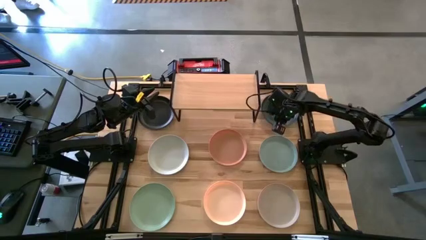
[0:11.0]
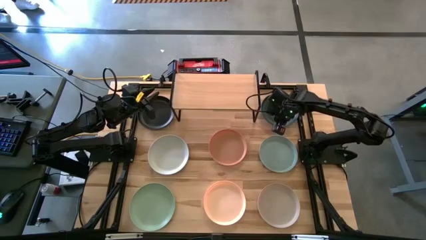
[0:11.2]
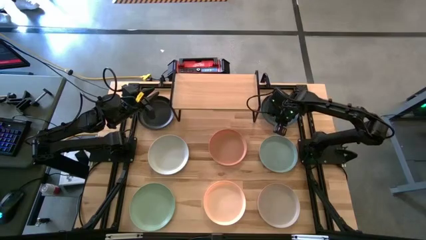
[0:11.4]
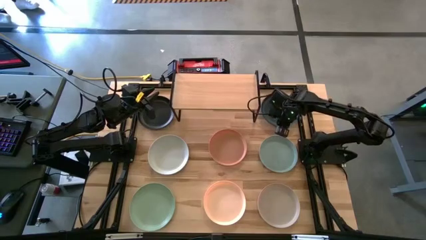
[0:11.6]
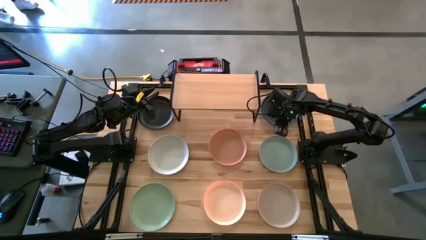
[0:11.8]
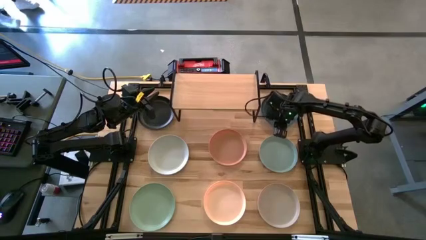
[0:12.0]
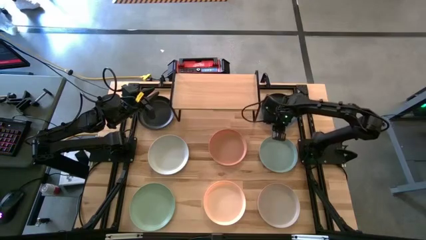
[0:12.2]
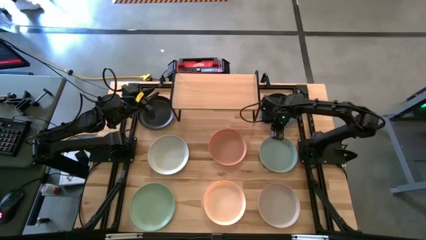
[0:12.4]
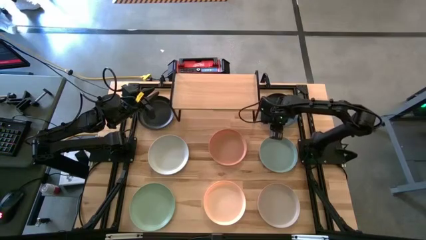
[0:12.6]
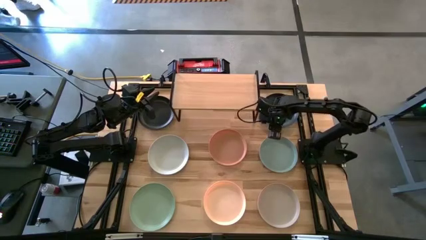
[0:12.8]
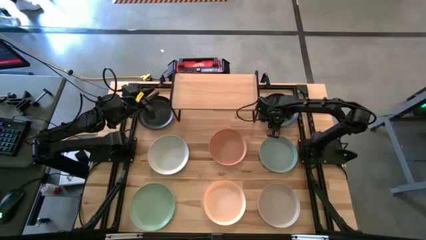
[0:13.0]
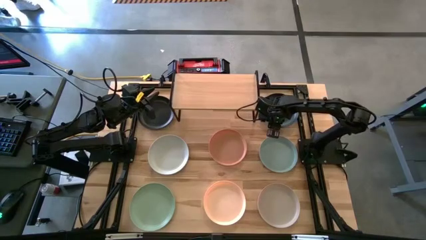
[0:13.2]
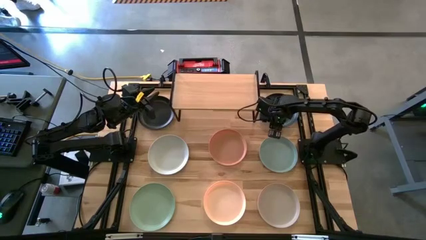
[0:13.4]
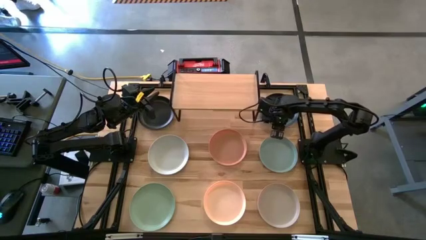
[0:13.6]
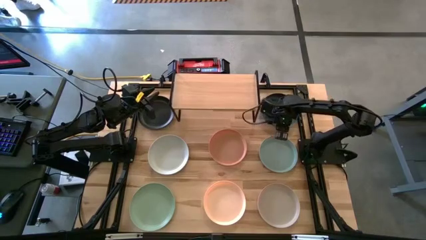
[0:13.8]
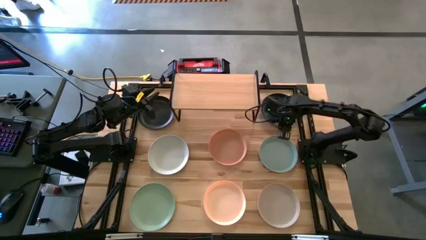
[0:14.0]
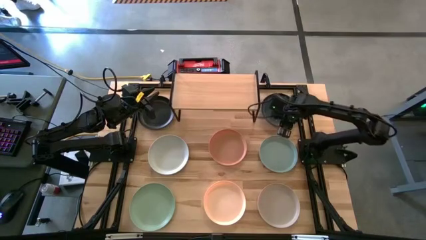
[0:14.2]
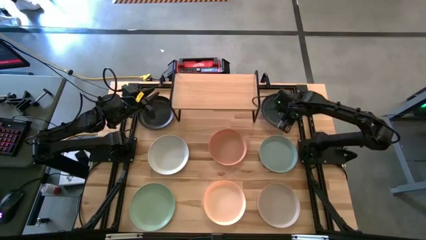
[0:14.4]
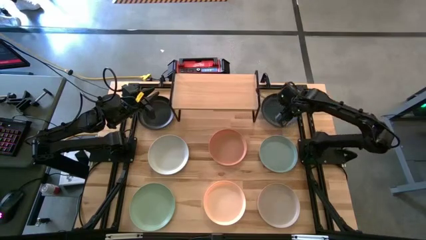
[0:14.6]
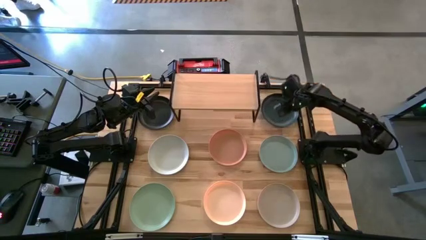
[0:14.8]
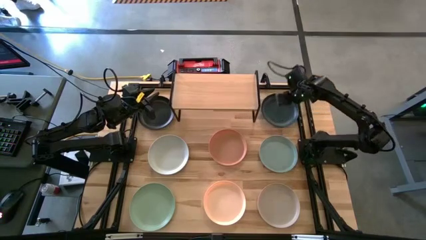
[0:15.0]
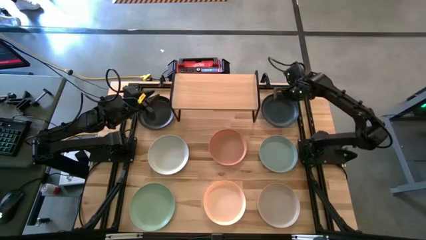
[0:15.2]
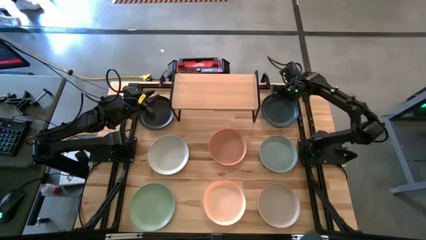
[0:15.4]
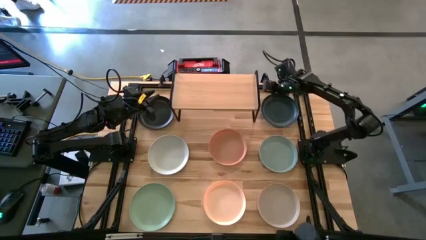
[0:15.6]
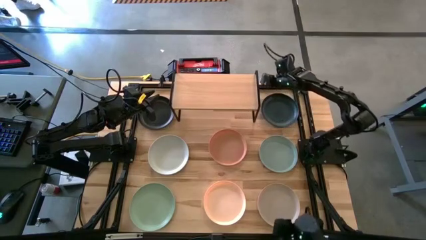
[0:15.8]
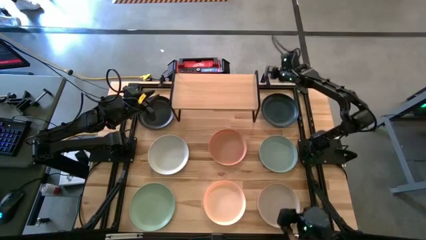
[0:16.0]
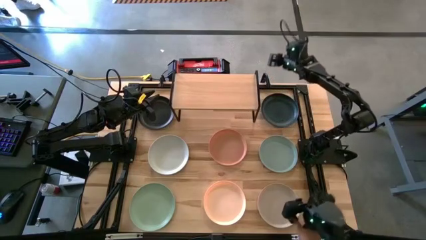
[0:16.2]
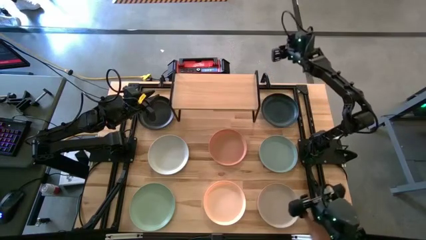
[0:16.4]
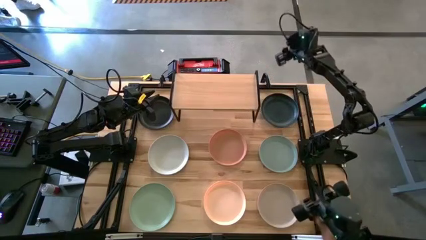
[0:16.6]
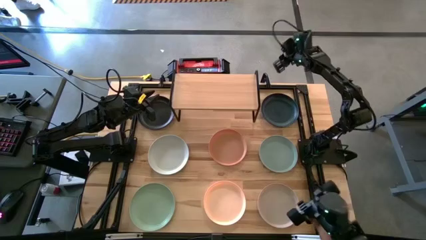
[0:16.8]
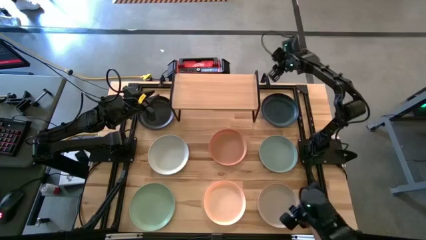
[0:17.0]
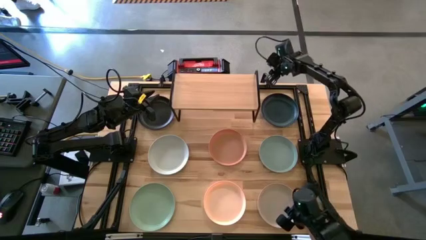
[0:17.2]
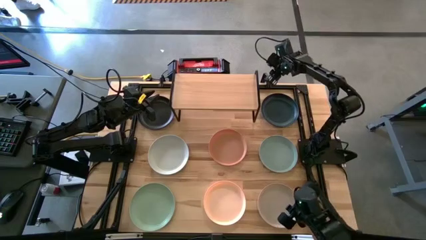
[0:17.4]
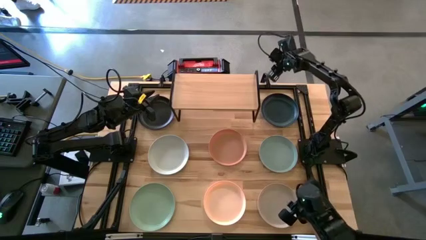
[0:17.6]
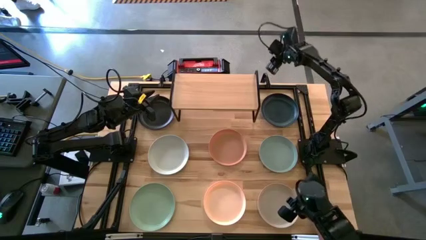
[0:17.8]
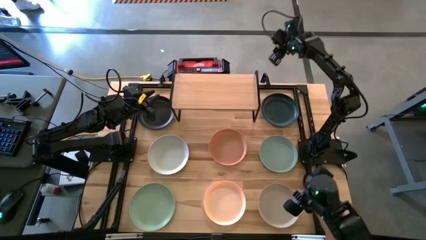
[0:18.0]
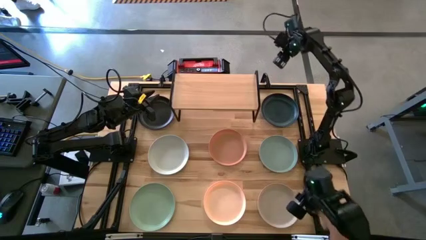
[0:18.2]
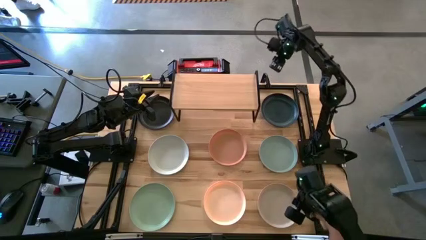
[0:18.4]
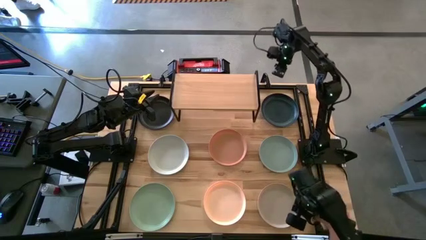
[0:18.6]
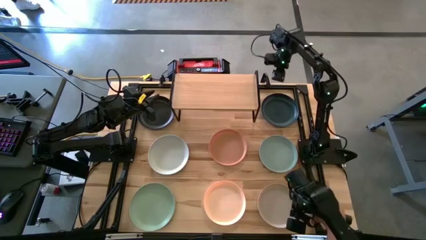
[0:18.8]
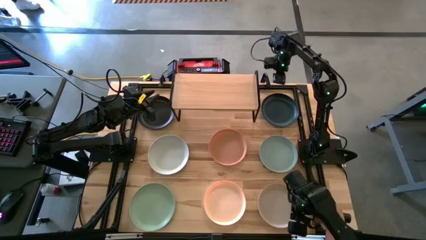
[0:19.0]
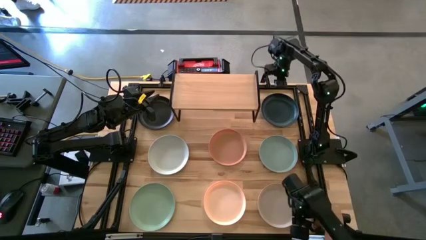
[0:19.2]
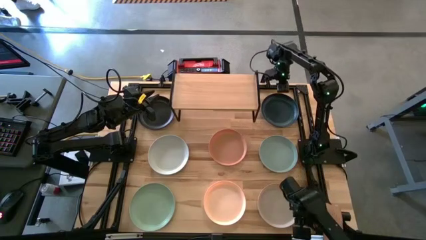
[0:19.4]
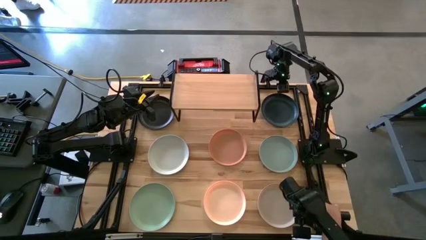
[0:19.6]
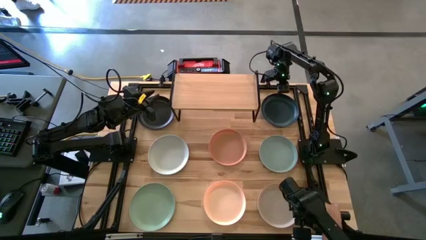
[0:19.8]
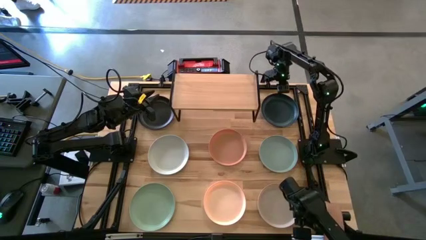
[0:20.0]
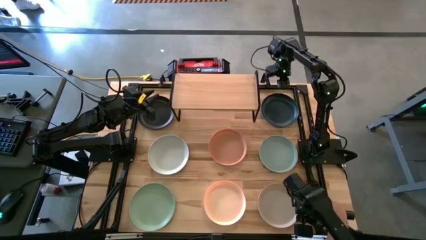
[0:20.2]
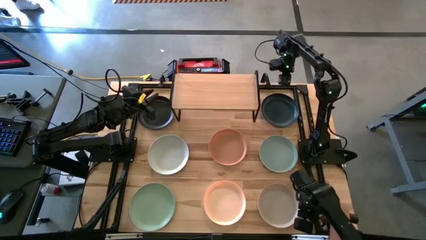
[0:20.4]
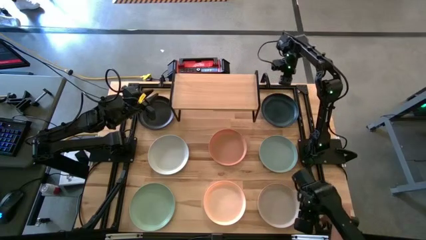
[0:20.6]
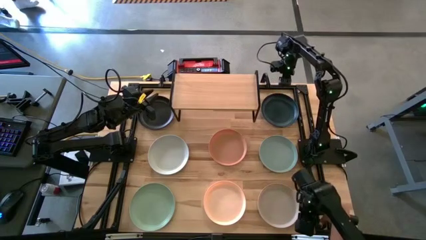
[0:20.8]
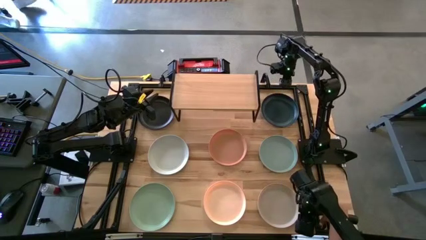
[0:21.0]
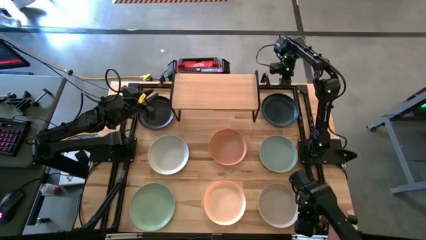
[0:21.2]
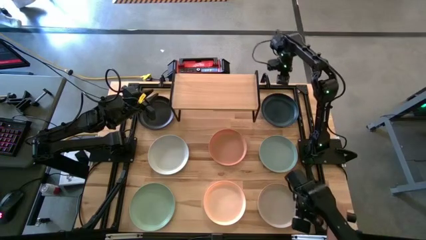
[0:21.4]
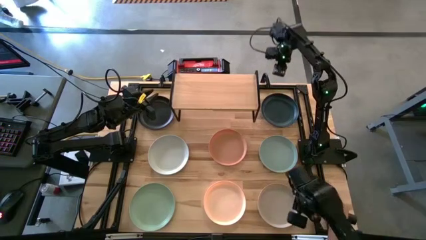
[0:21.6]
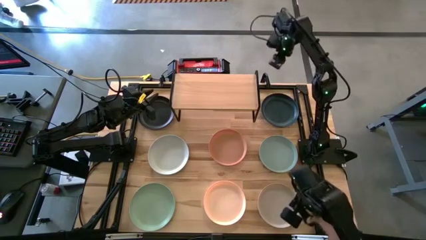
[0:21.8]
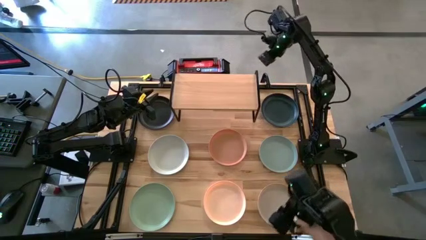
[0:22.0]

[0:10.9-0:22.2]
Task: Place and stack plates onto a shelf
Put the right black plate on the shelf
